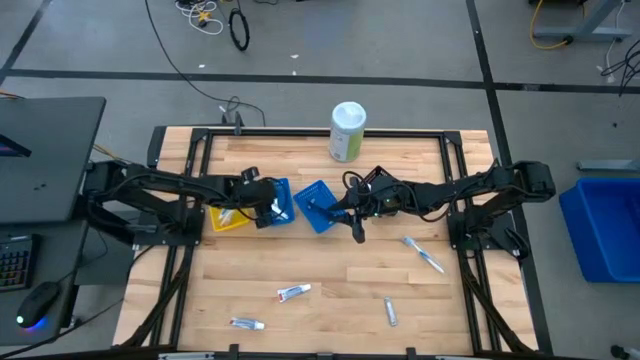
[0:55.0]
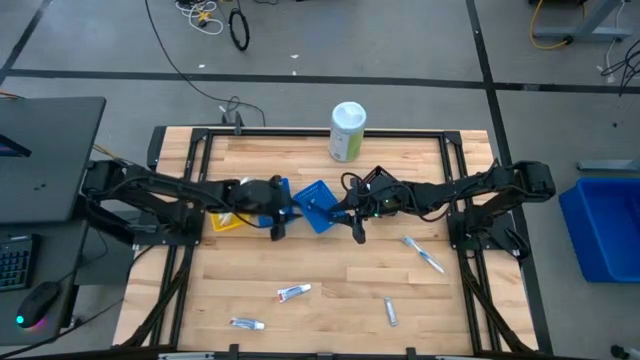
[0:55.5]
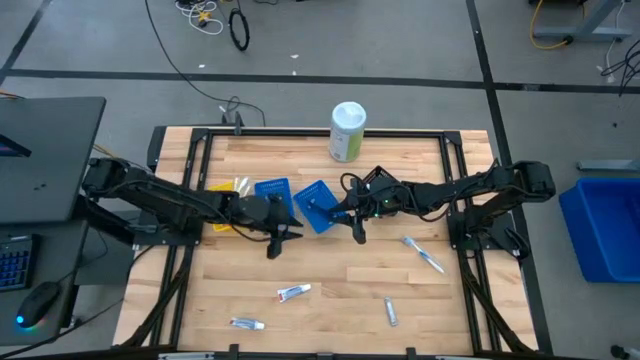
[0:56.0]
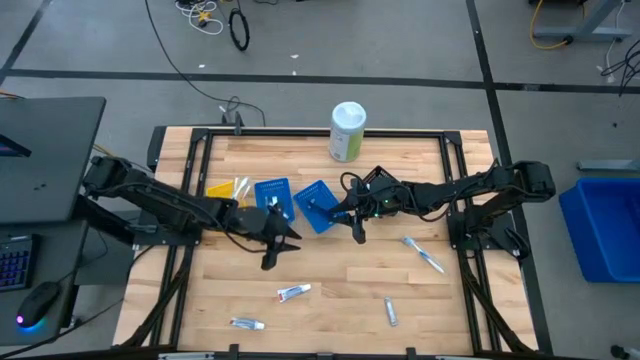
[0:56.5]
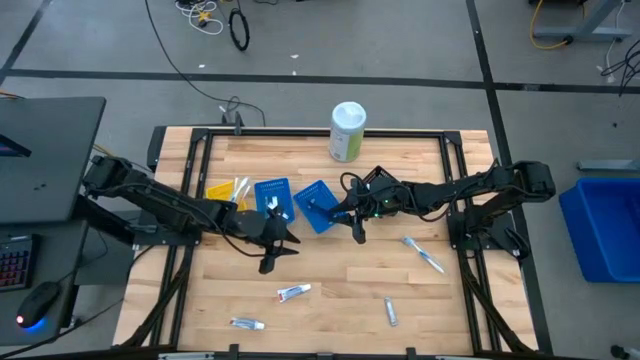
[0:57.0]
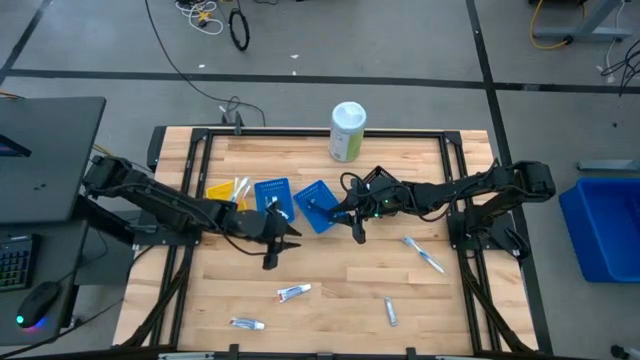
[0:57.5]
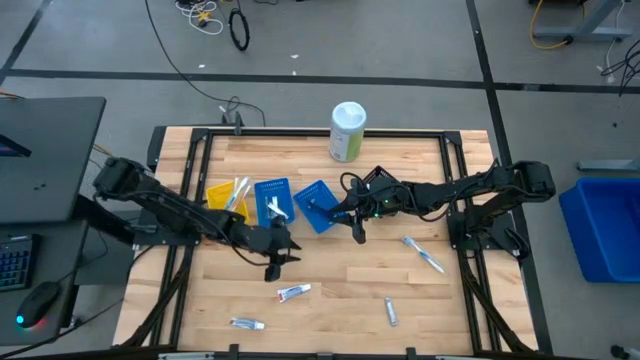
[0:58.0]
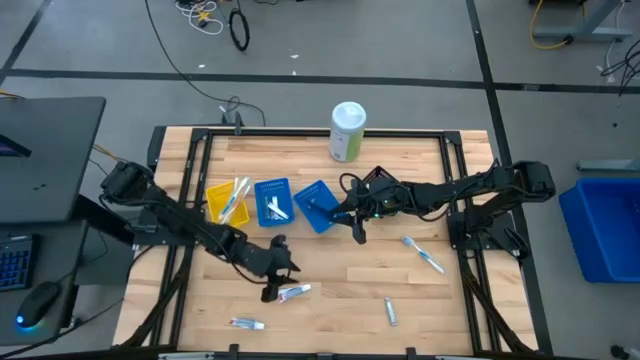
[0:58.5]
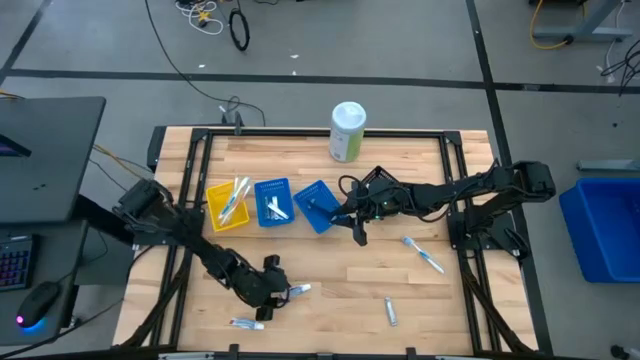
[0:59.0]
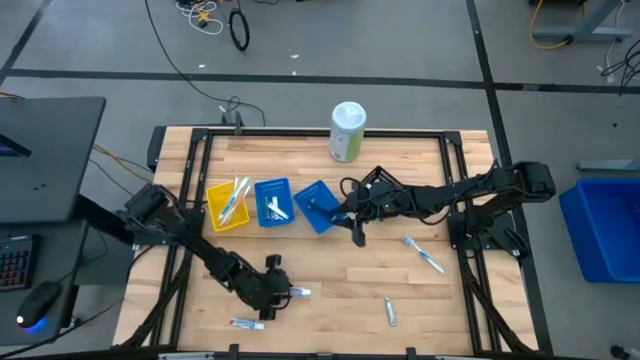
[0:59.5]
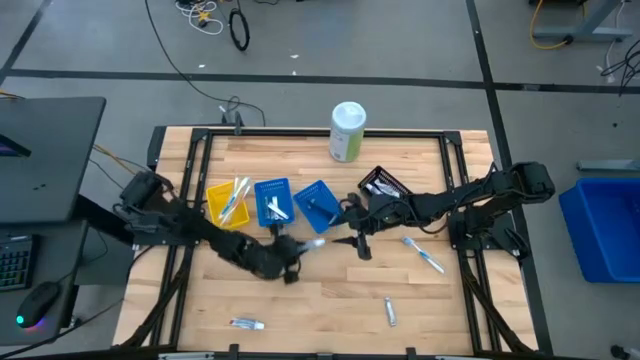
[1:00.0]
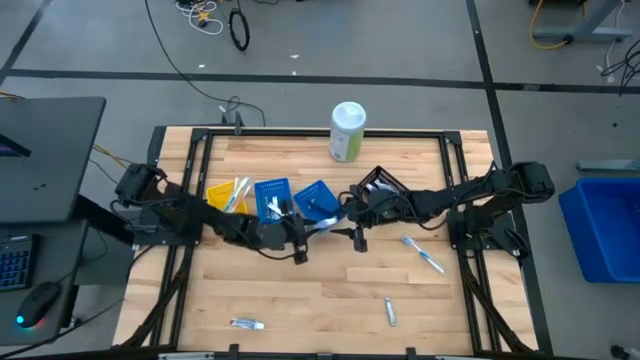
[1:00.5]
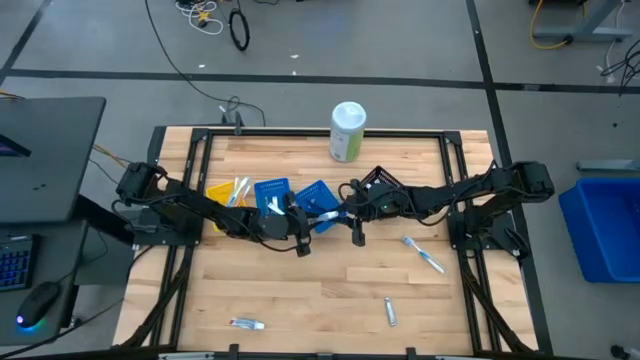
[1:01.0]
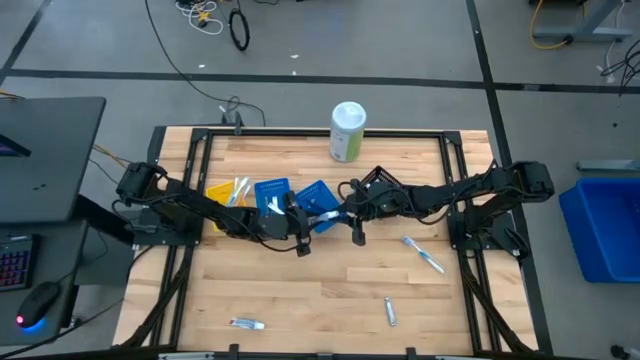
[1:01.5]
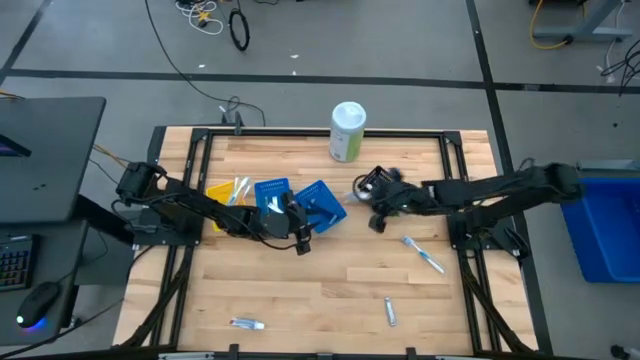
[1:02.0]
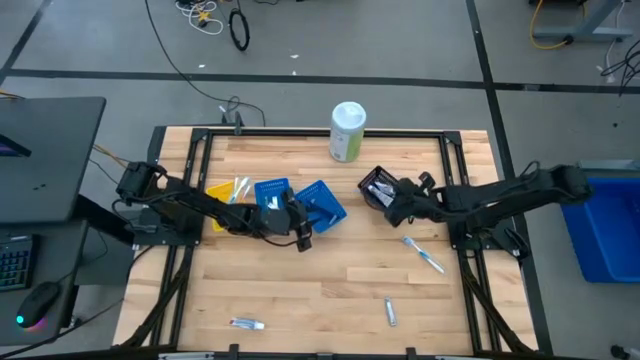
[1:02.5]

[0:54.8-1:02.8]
Task: Pick & Place Travel size toiletries
Put the white toothpaste into the black bin

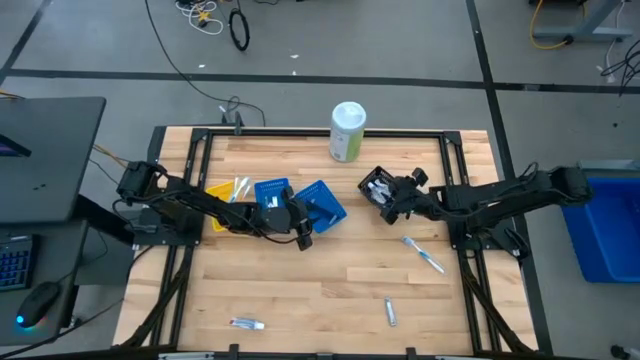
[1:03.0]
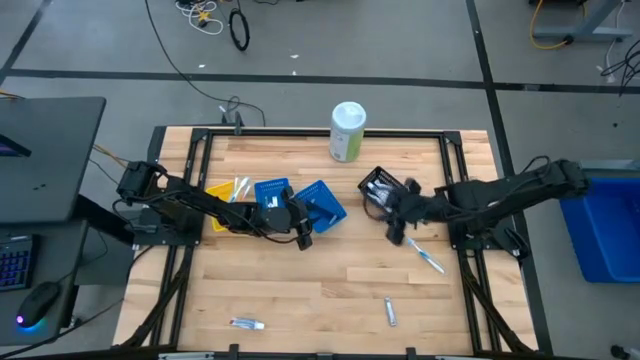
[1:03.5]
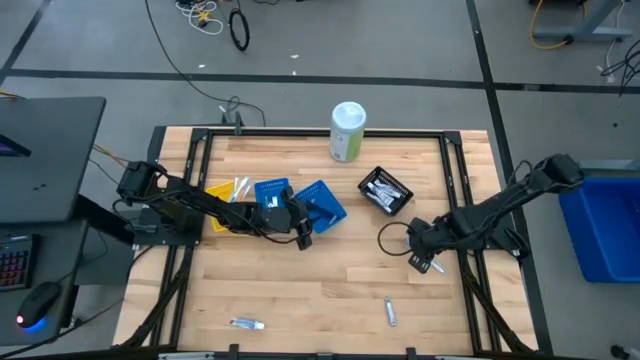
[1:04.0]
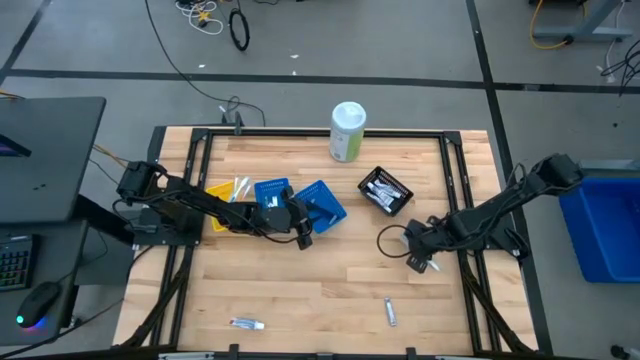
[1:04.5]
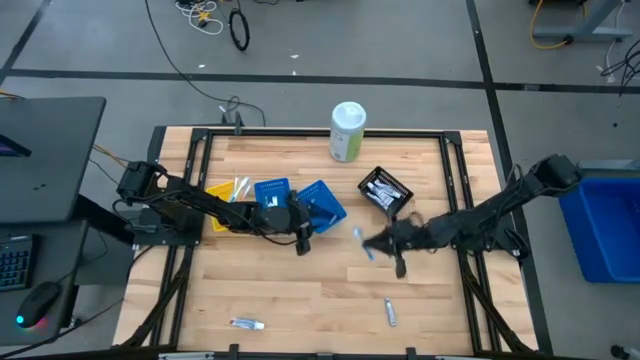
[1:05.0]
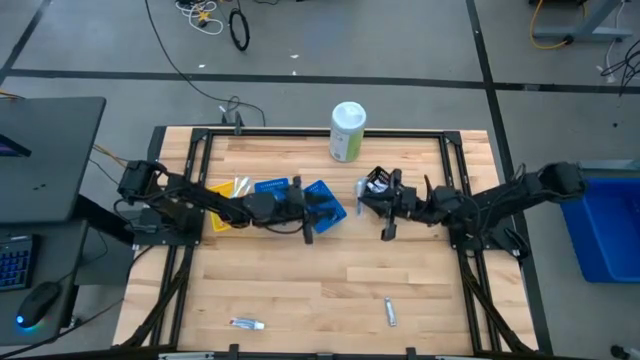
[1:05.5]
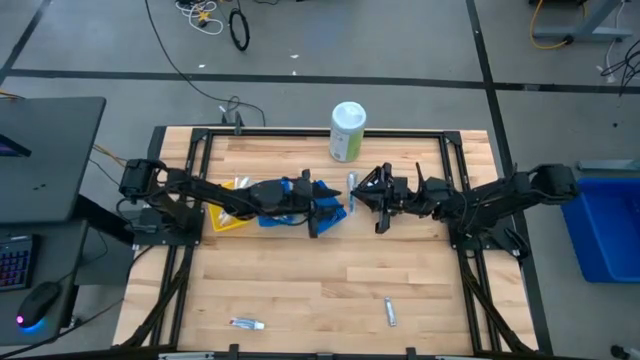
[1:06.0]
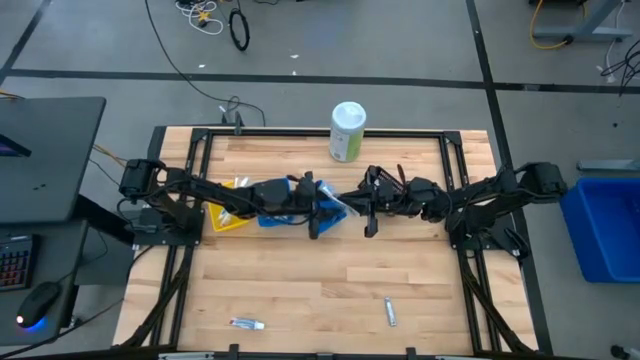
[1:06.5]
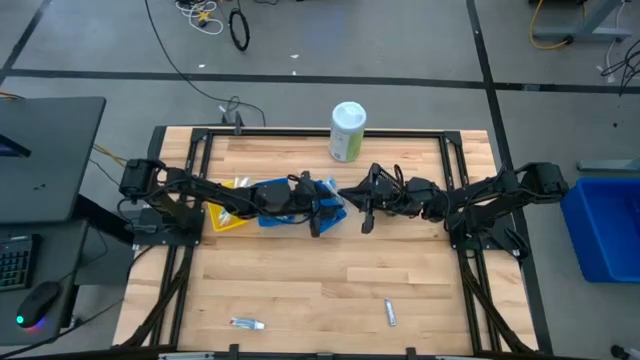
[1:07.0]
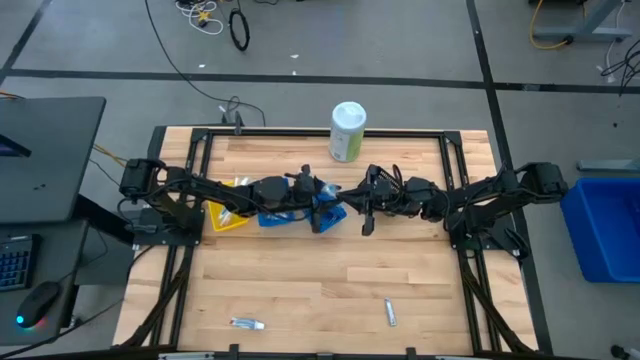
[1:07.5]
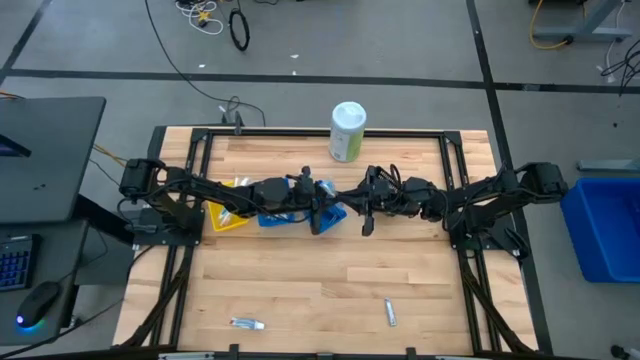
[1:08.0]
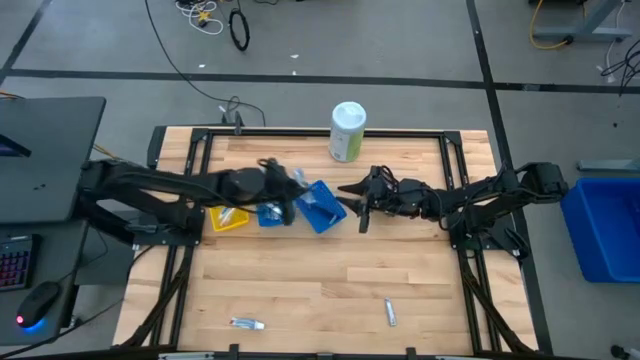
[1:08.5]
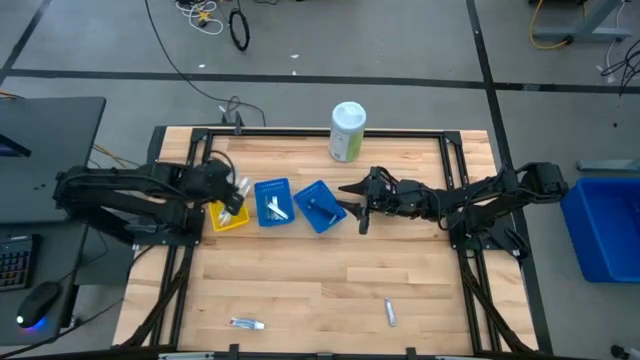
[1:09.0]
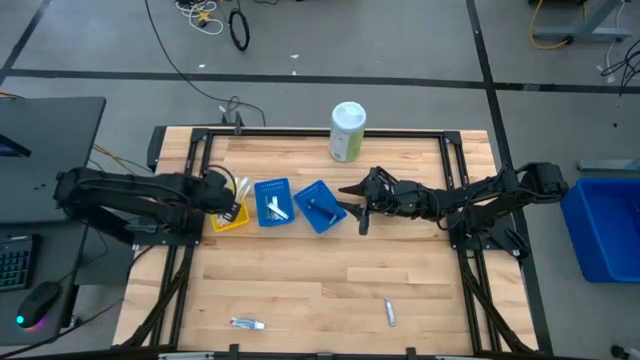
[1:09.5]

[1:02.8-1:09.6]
Put the blue toothbrush into the yellow bin

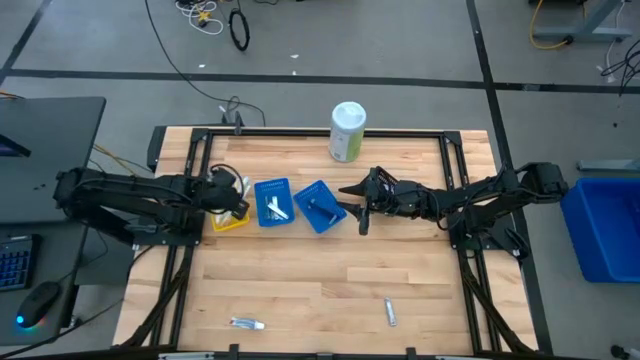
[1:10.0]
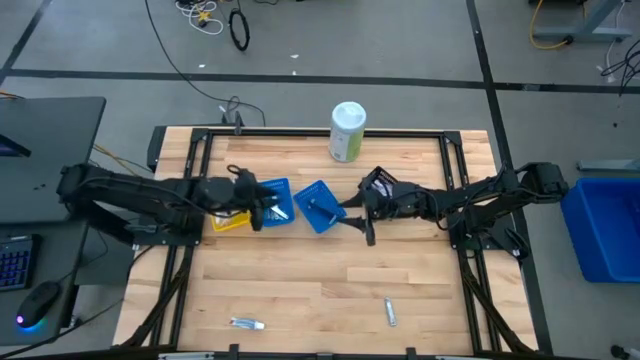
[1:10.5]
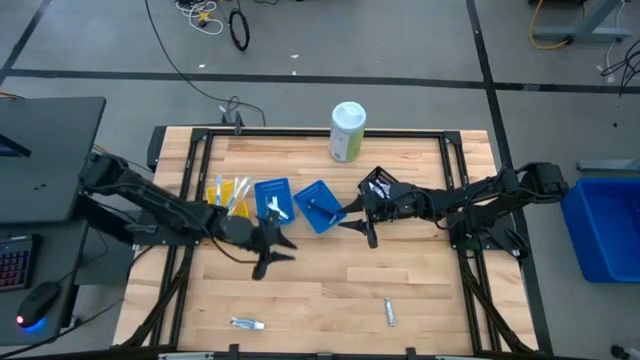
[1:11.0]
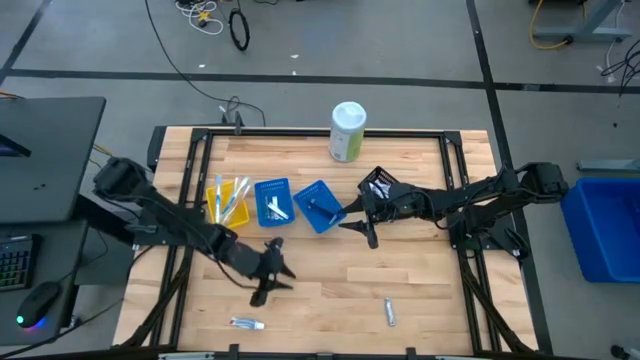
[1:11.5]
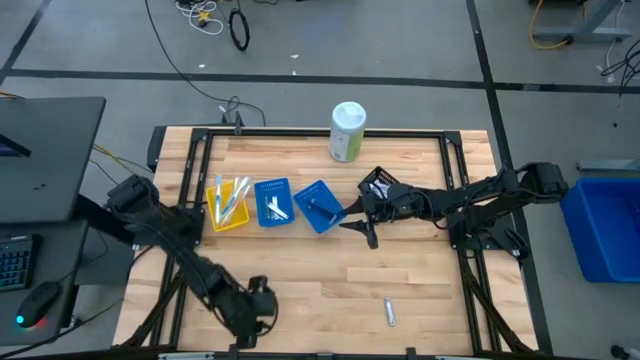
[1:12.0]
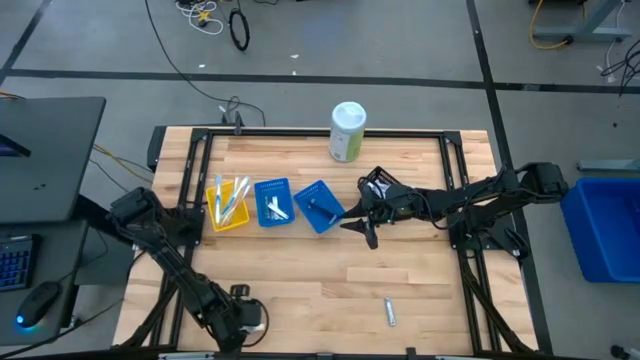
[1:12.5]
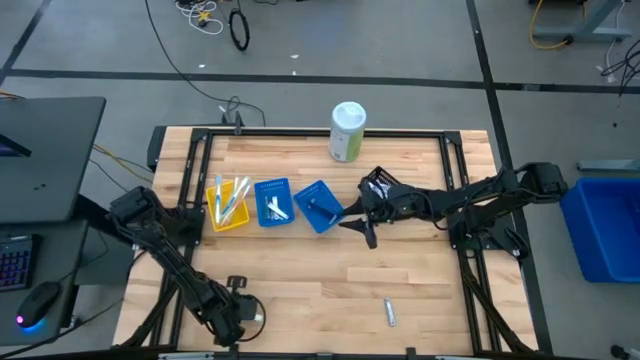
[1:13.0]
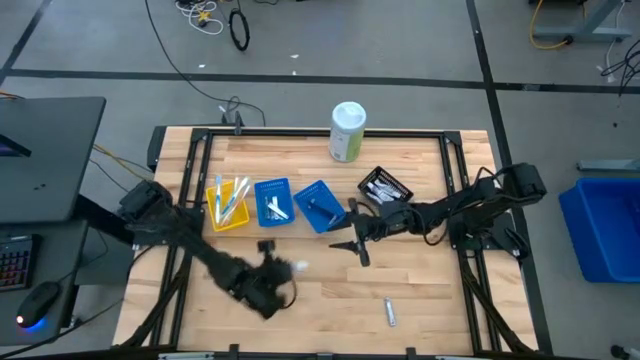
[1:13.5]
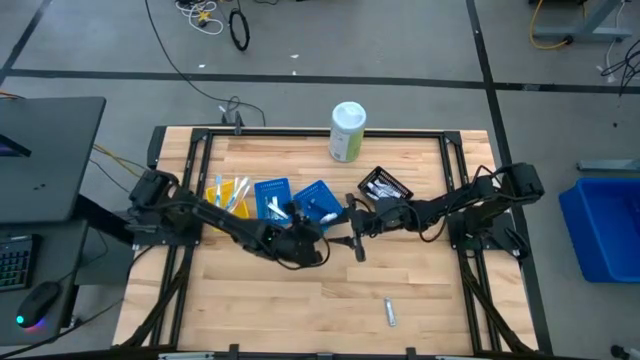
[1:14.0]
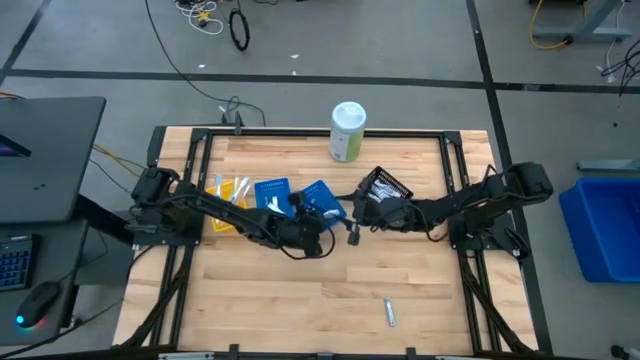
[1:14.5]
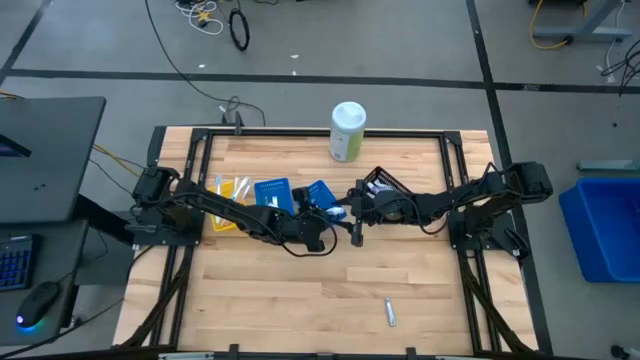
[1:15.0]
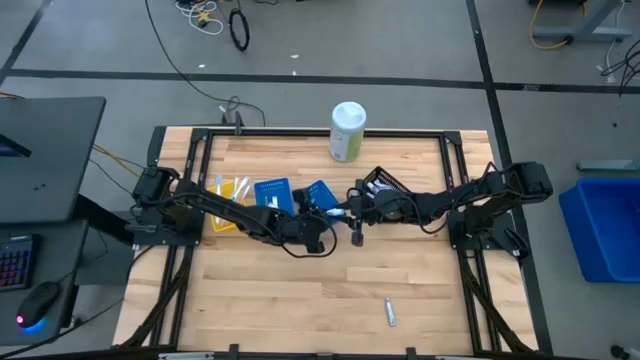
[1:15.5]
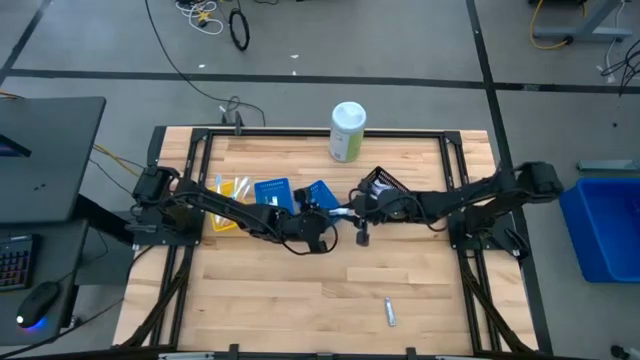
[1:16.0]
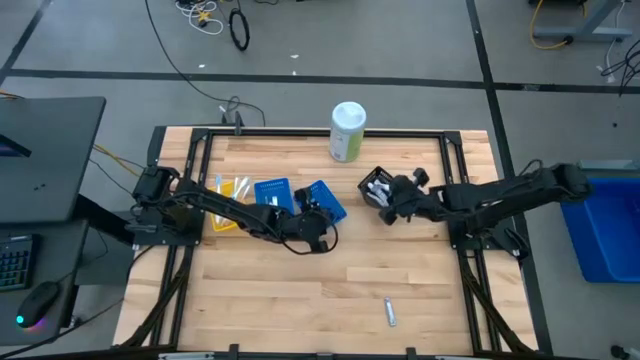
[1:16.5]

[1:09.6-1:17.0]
Put the white toothpaste into the black bin
